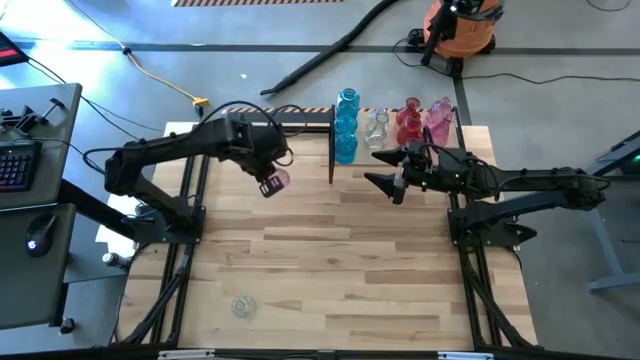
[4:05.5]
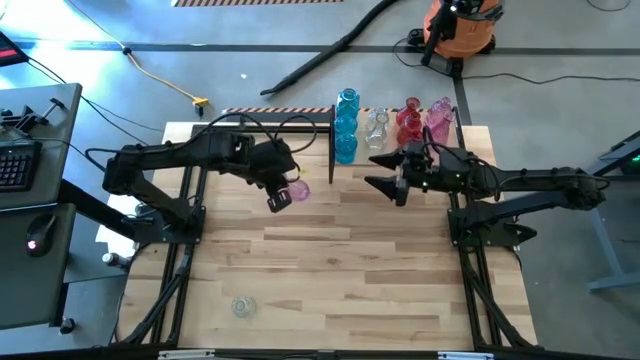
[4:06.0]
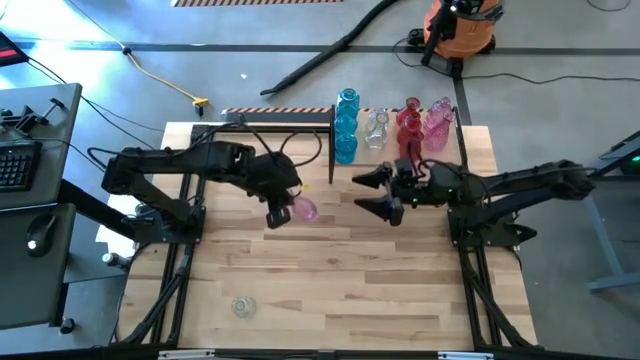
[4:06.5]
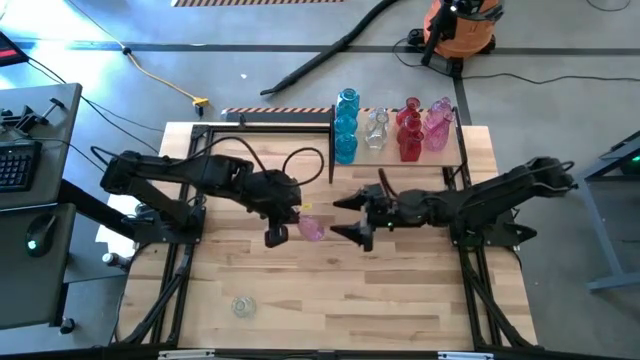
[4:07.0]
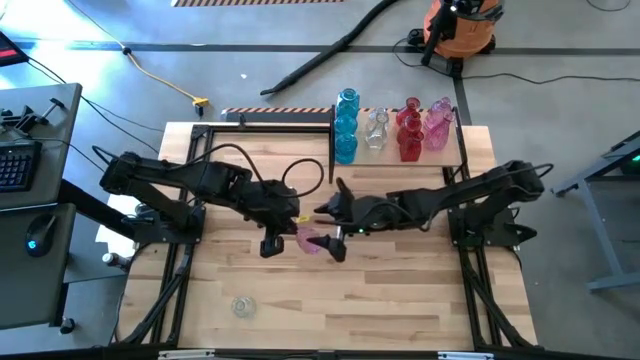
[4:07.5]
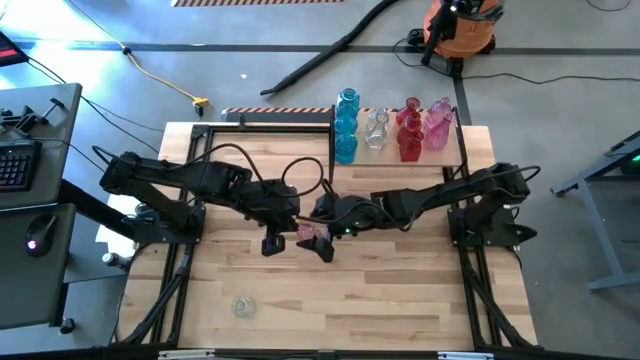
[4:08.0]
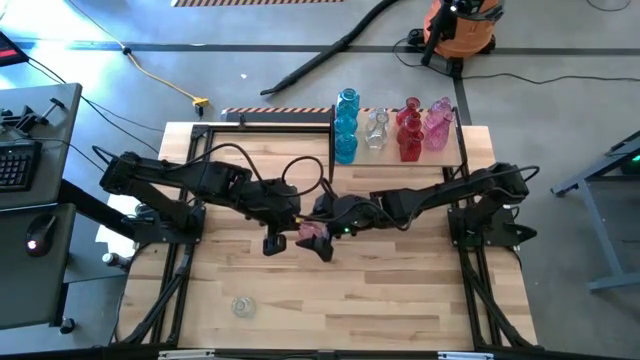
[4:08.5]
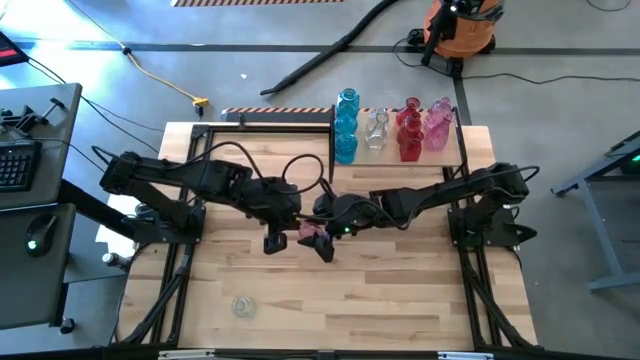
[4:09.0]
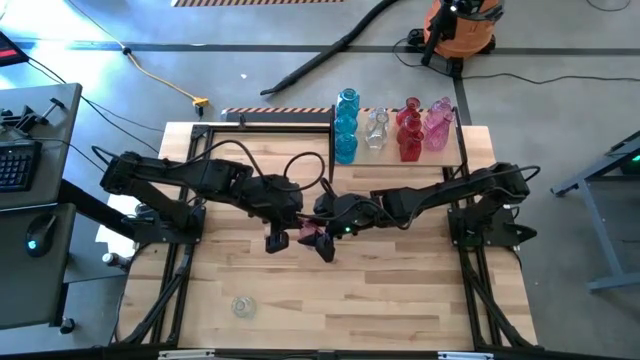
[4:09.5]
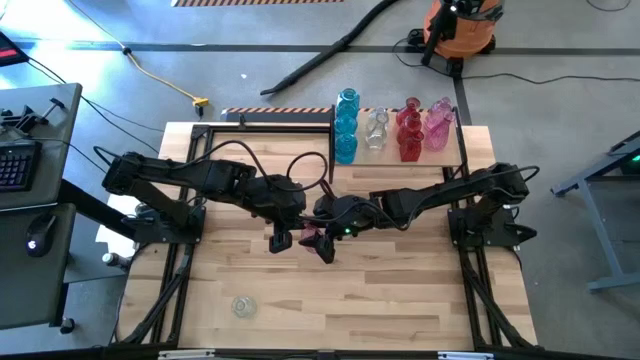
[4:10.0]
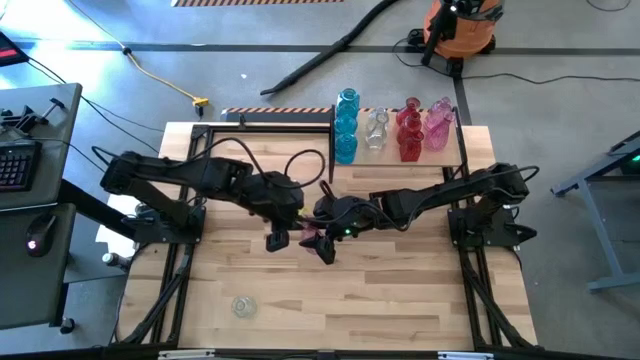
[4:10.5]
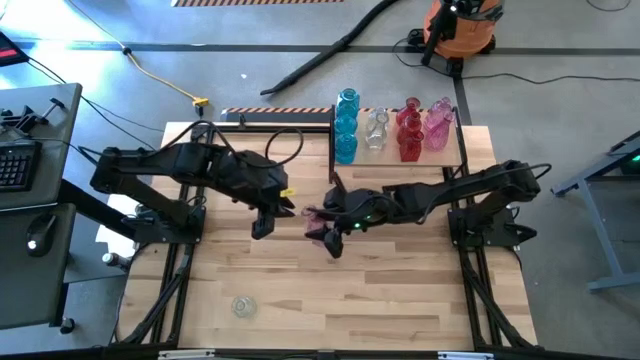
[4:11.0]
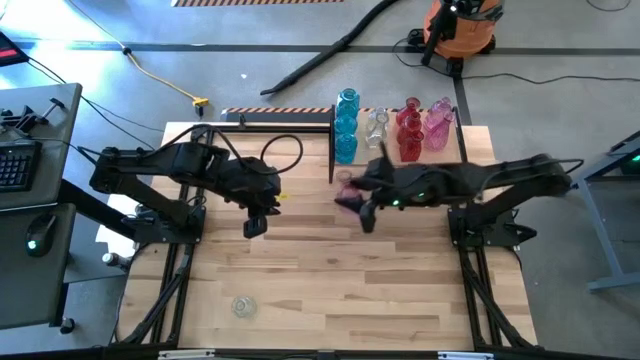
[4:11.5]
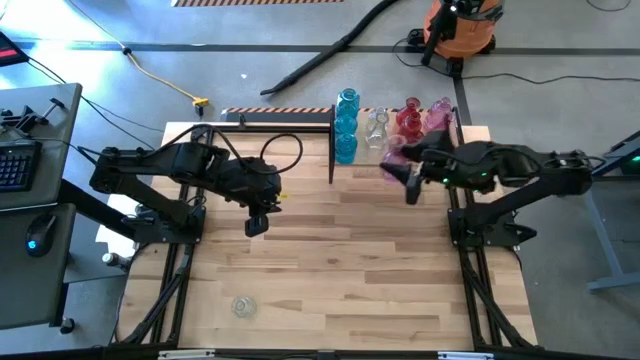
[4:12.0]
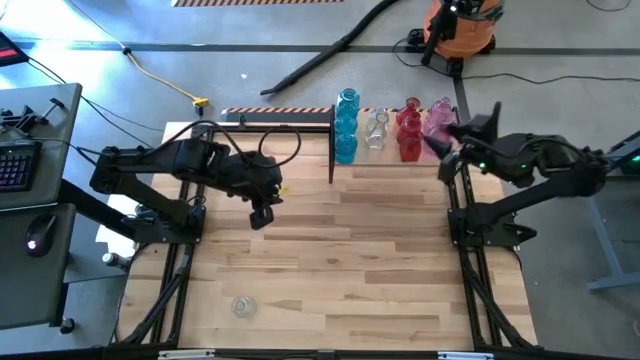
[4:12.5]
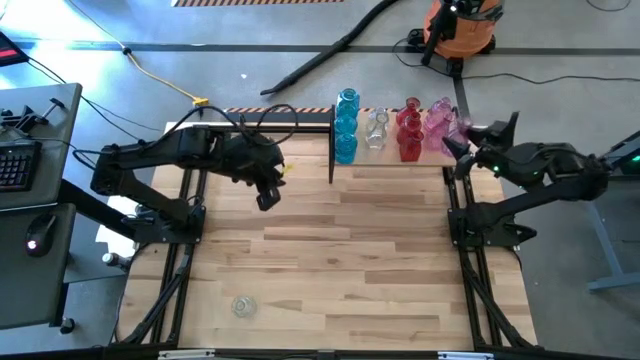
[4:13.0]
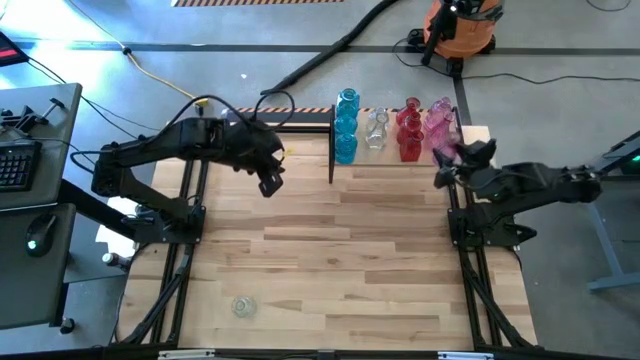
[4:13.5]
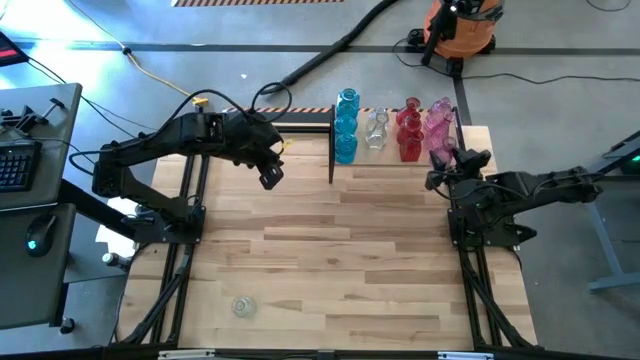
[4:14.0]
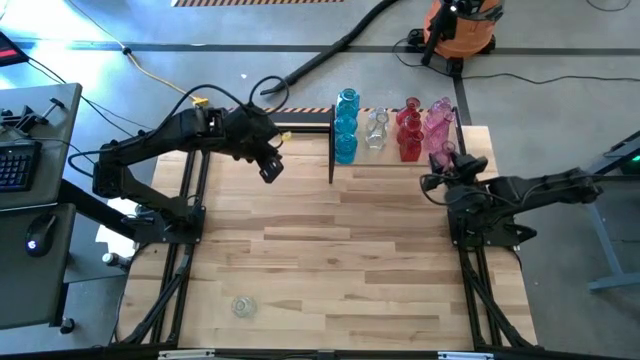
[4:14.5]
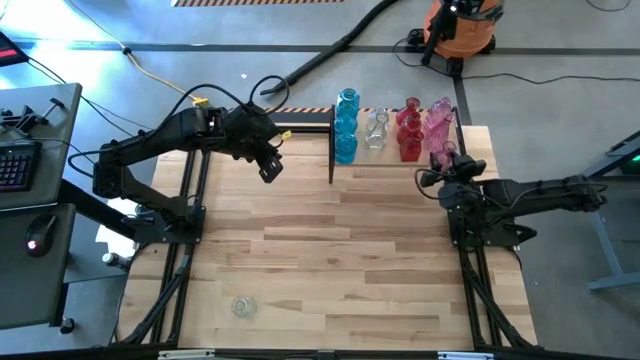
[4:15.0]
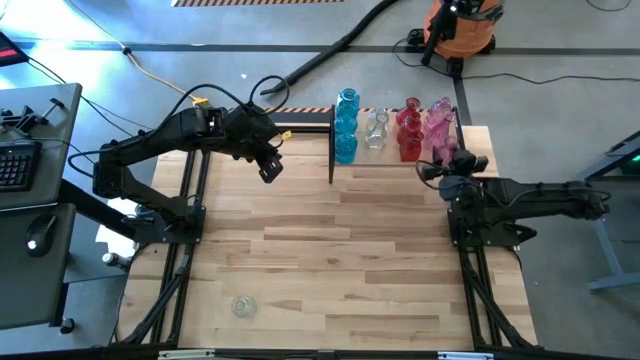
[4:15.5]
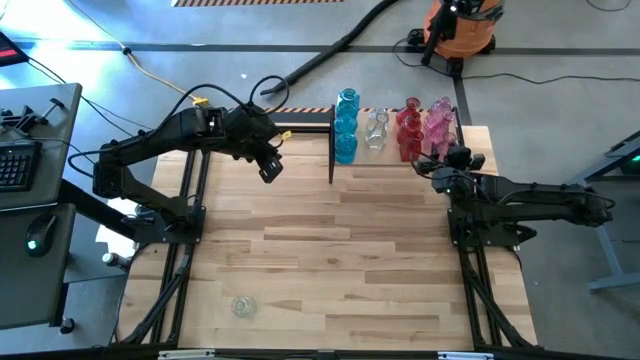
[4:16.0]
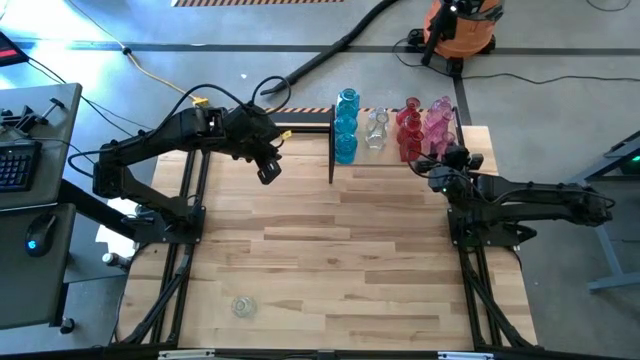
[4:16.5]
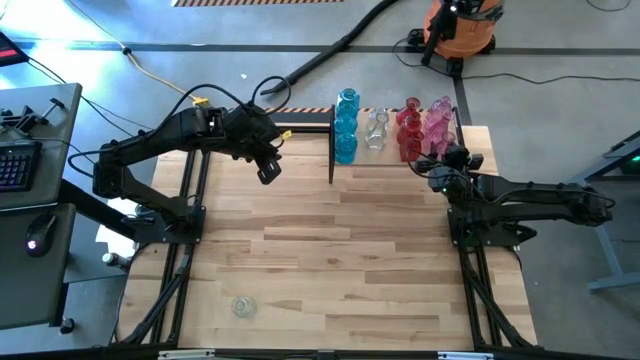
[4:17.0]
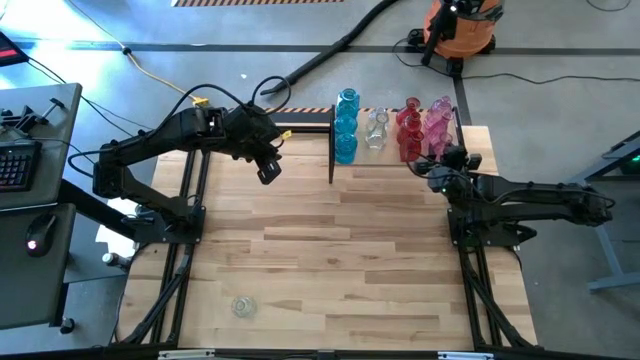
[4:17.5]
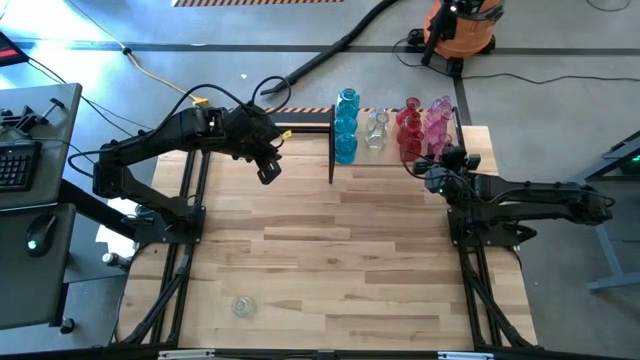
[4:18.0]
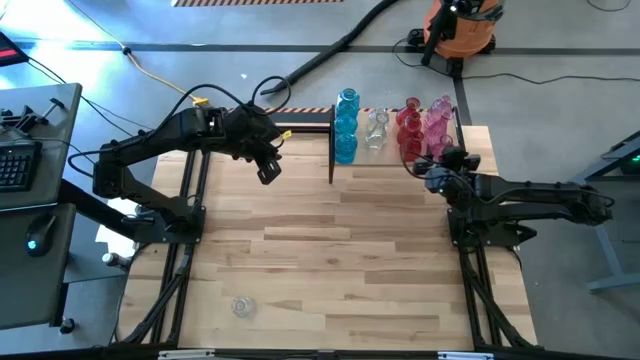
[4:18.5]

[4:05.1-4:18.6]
Task: sort vases onto shelf
Put the purple vase on the shelf aligned with the other purple vase

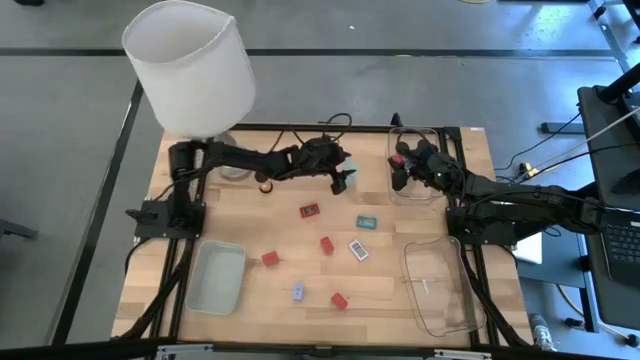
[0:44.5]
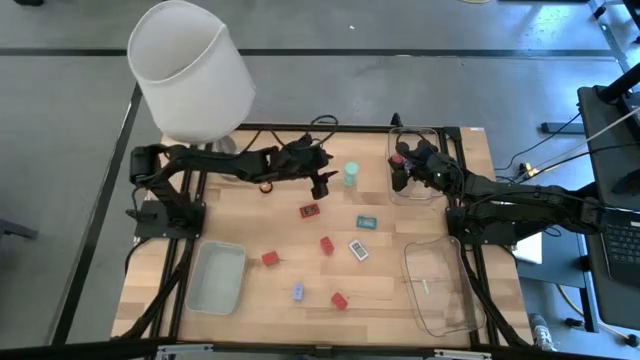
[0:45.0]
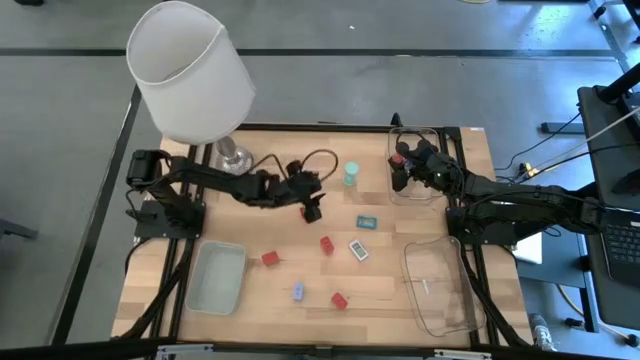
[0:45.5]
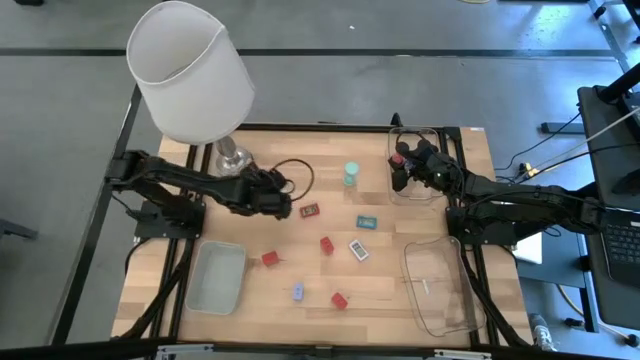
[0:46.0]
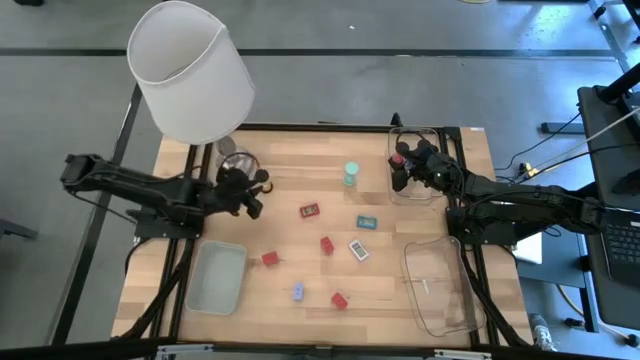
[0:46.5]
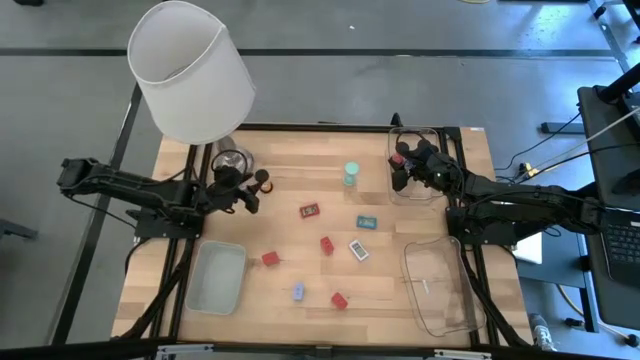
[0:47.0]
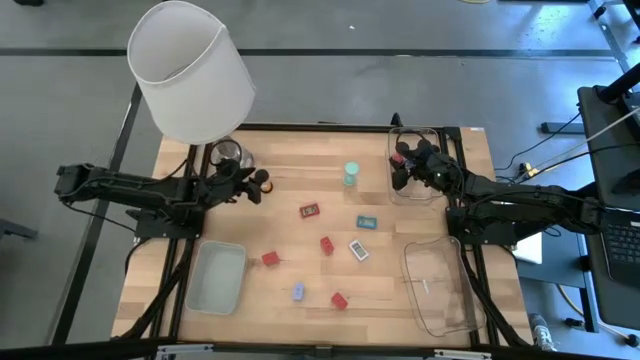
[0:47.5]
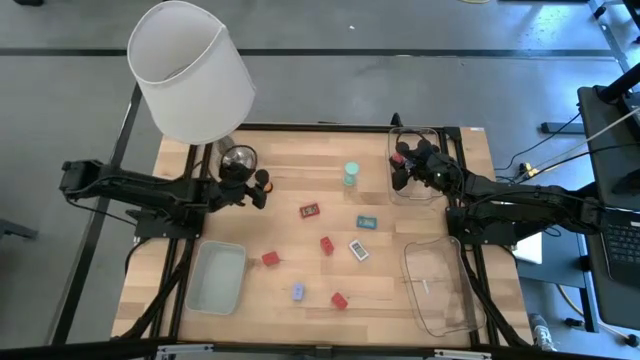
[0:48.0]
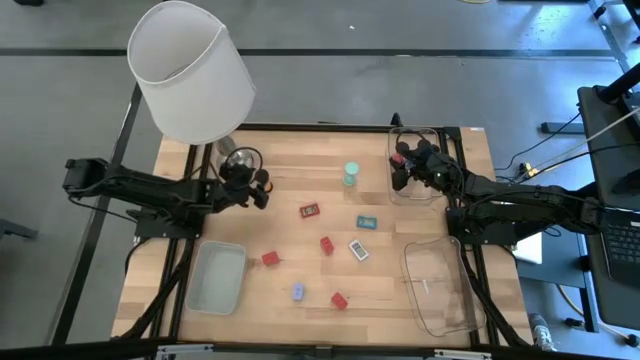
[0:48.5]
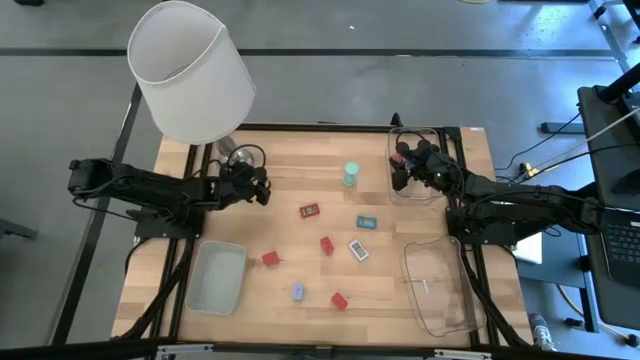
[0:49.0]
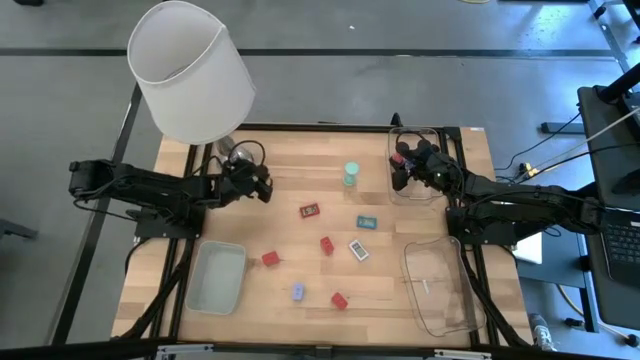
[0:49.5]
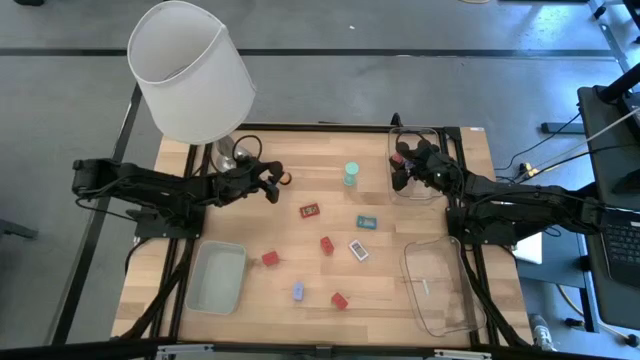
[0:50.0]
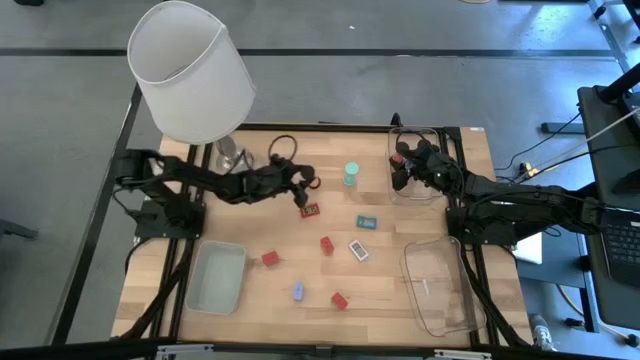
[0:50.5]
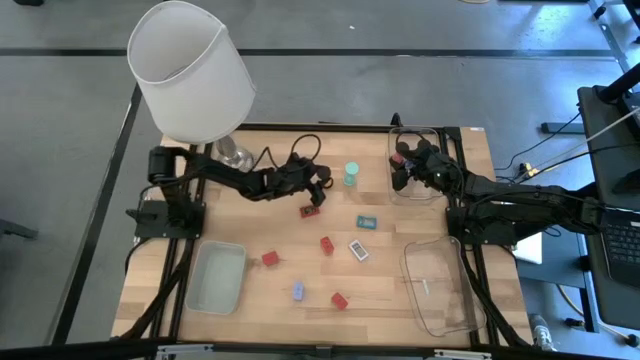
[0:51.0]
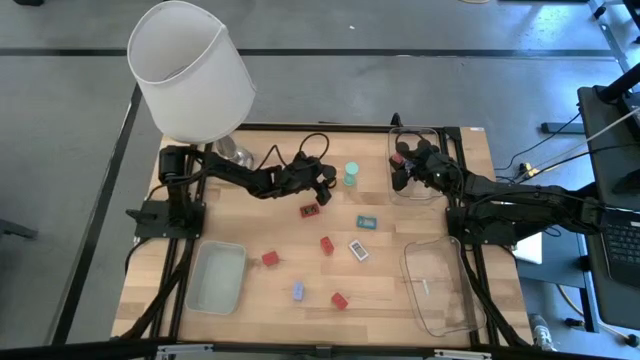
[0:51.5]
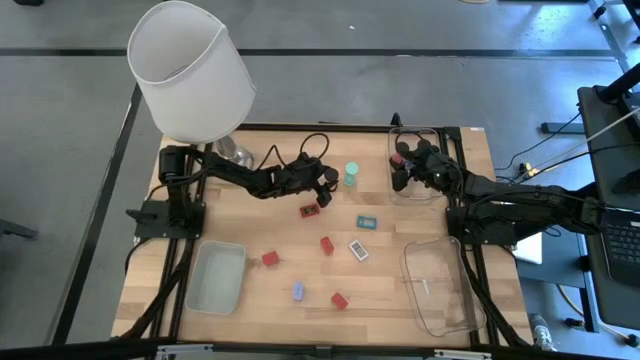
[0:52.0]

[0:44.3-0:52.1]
Task: Pick & Place Office items
Move the orange sand timer to the top center of the table
